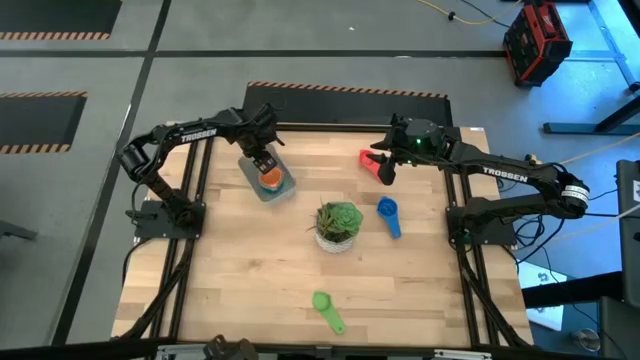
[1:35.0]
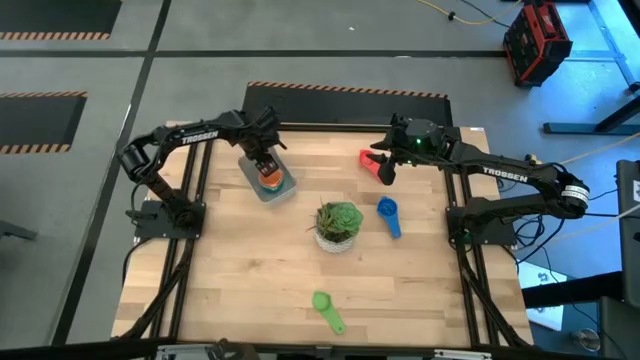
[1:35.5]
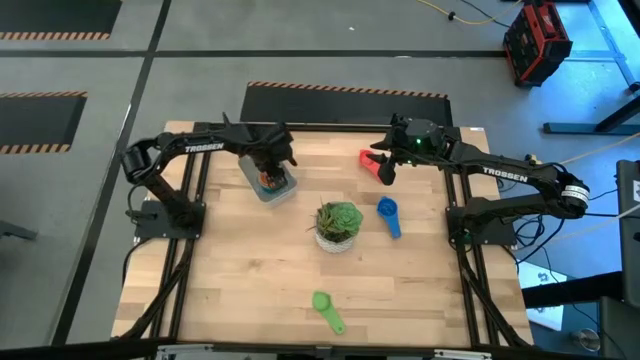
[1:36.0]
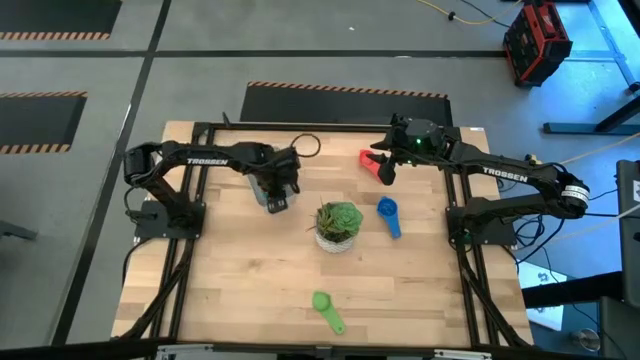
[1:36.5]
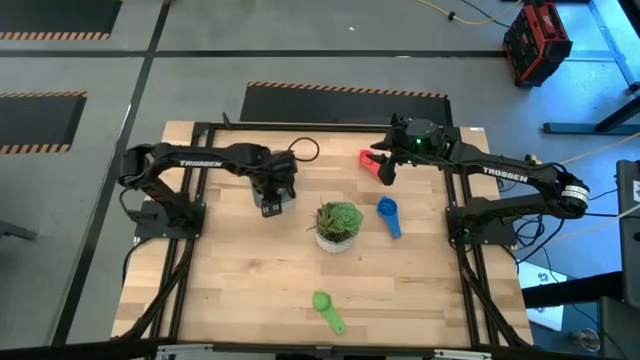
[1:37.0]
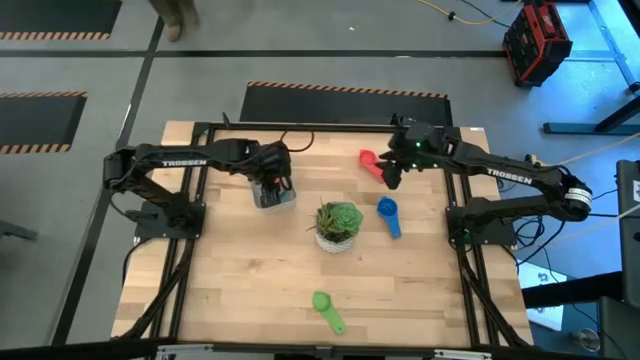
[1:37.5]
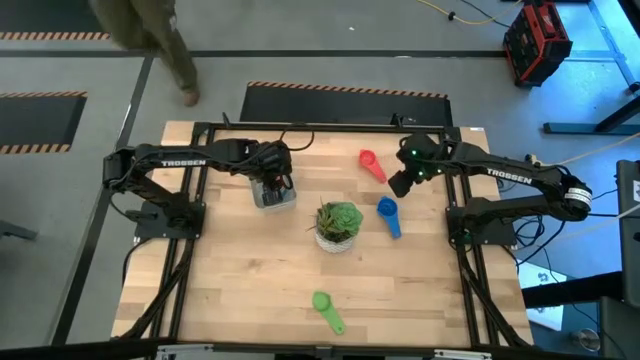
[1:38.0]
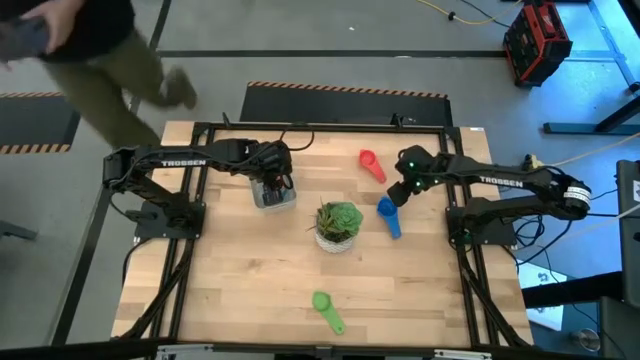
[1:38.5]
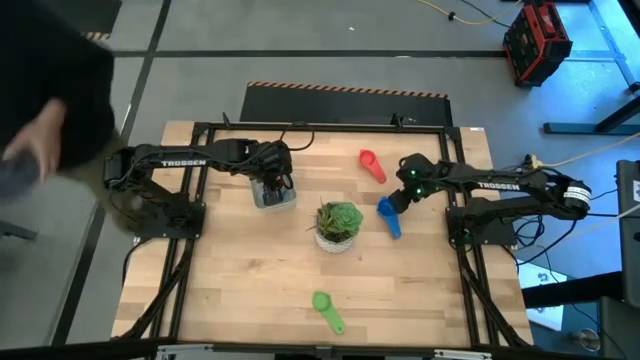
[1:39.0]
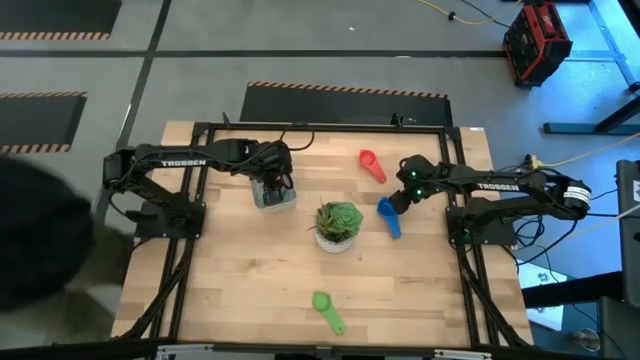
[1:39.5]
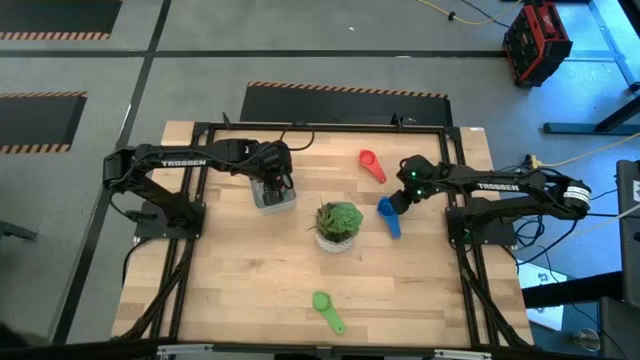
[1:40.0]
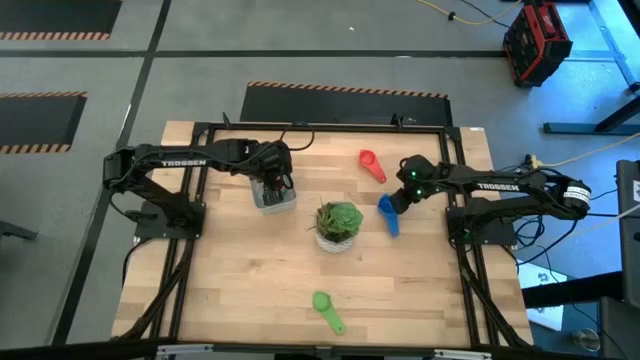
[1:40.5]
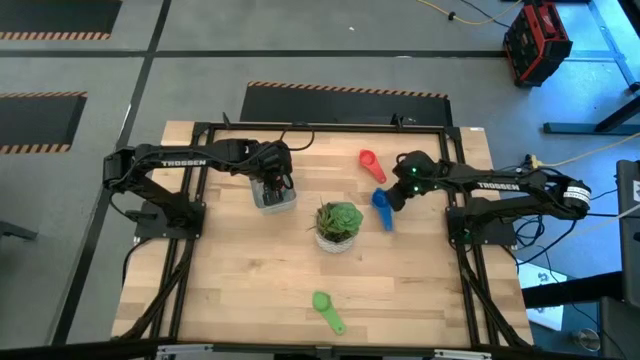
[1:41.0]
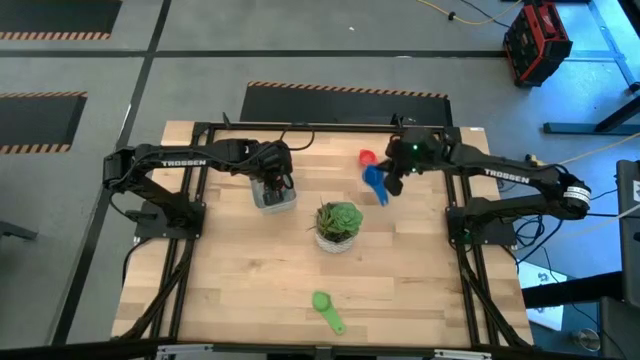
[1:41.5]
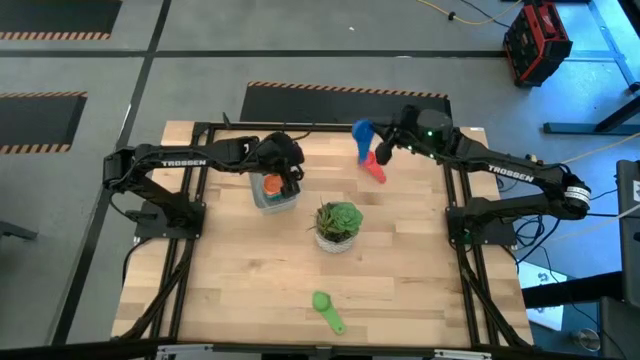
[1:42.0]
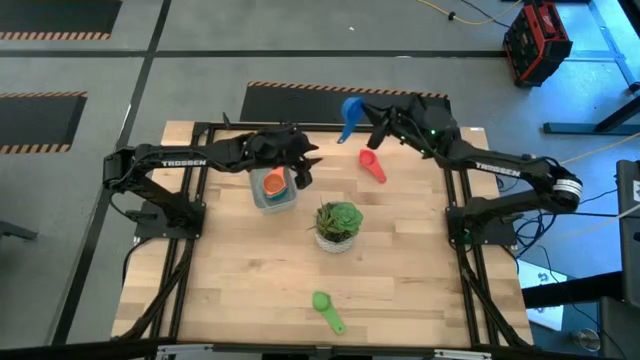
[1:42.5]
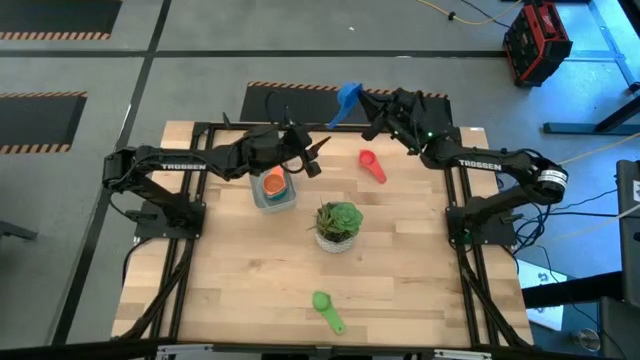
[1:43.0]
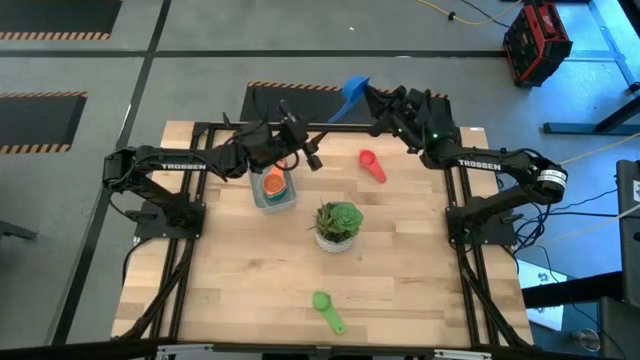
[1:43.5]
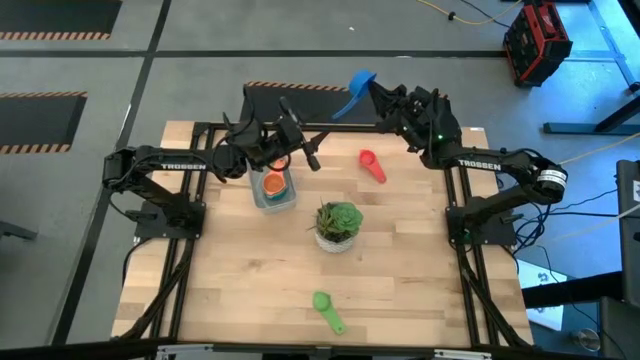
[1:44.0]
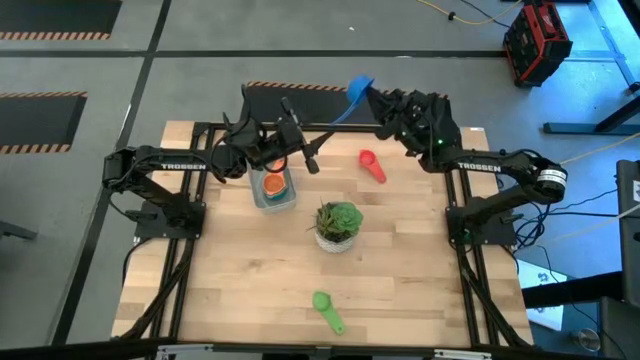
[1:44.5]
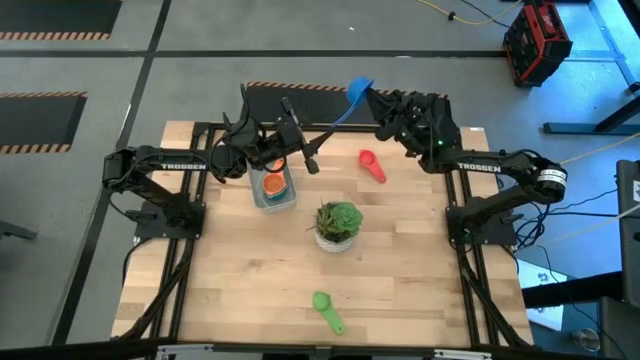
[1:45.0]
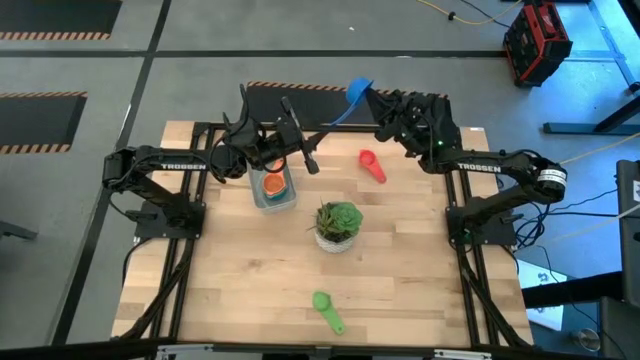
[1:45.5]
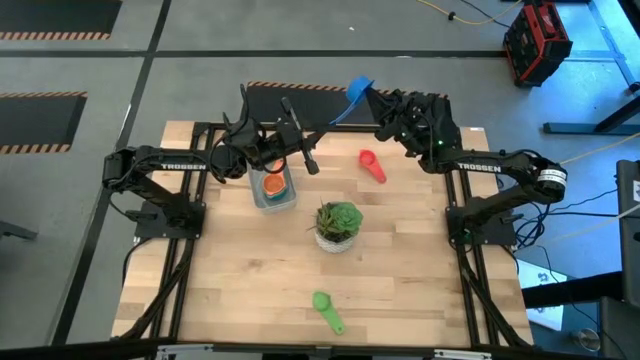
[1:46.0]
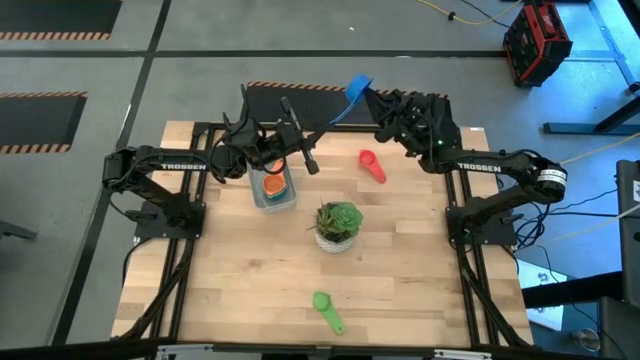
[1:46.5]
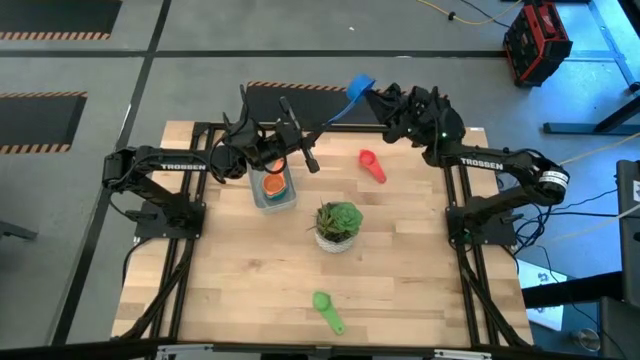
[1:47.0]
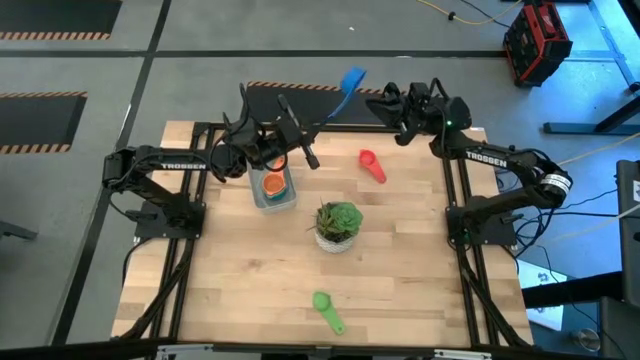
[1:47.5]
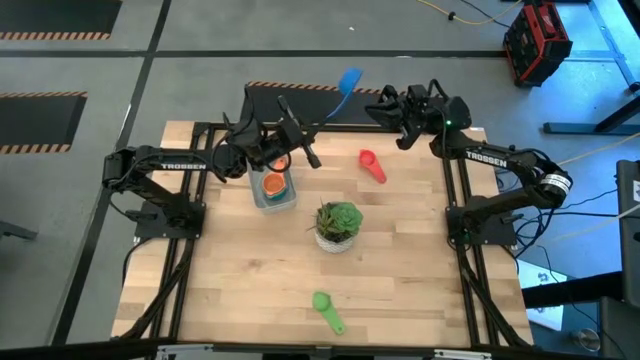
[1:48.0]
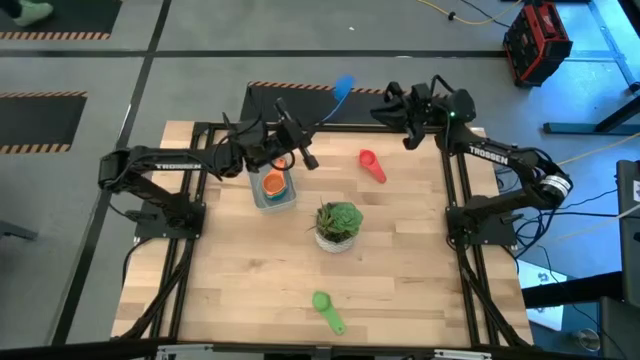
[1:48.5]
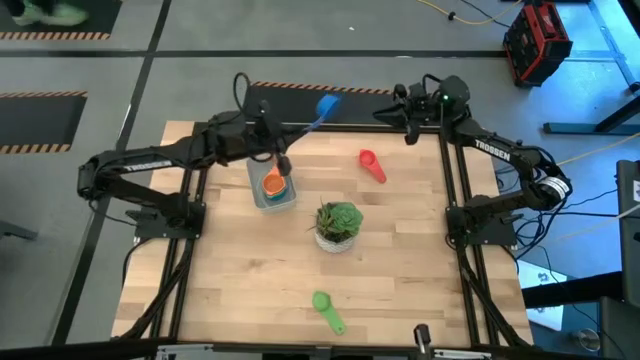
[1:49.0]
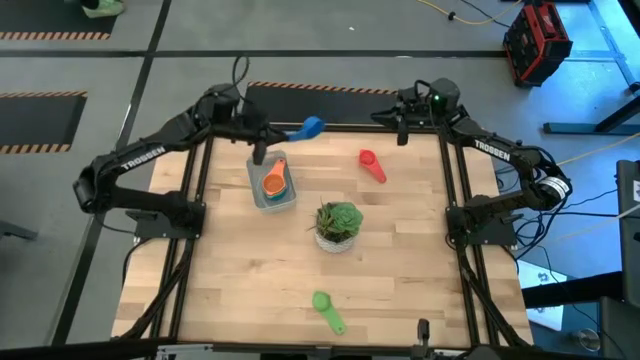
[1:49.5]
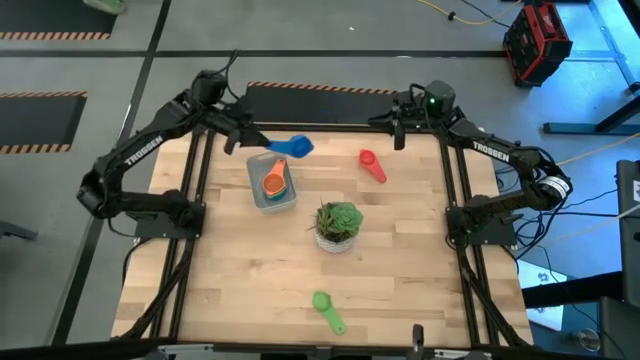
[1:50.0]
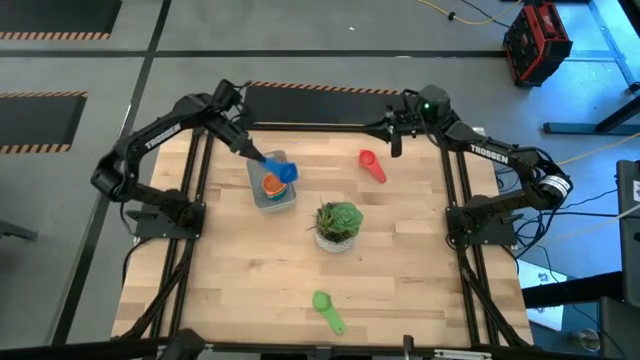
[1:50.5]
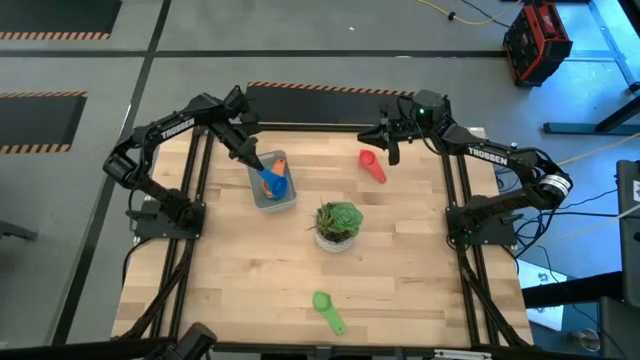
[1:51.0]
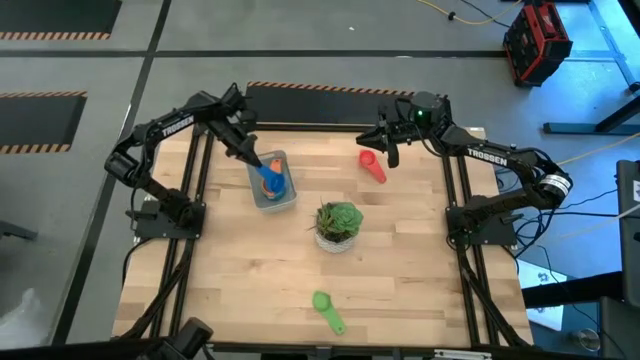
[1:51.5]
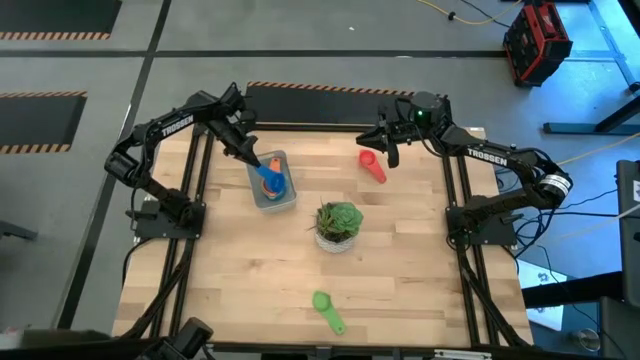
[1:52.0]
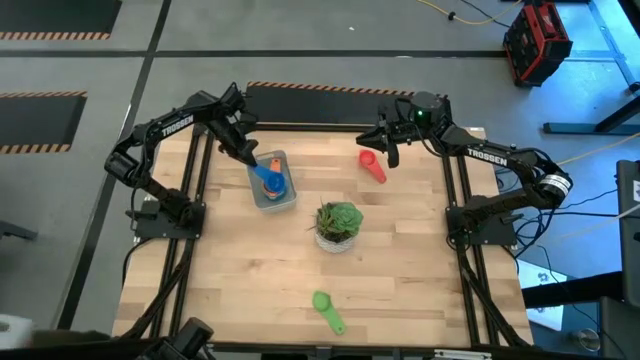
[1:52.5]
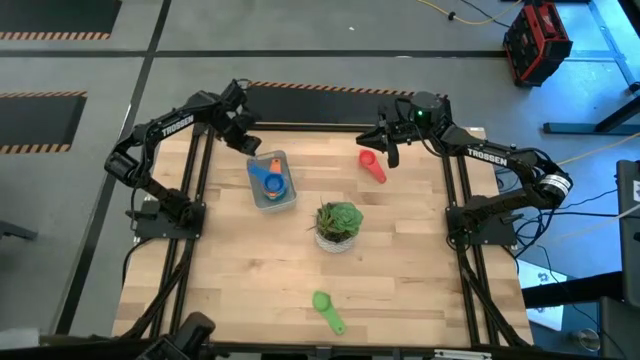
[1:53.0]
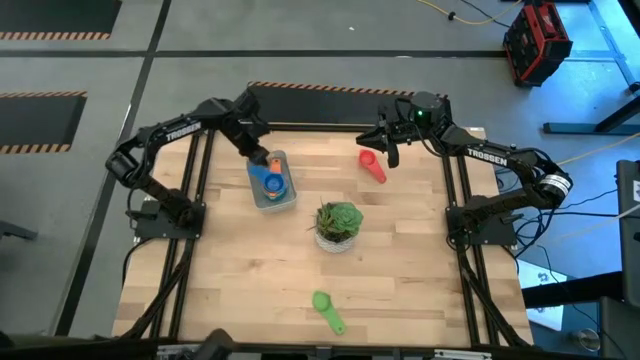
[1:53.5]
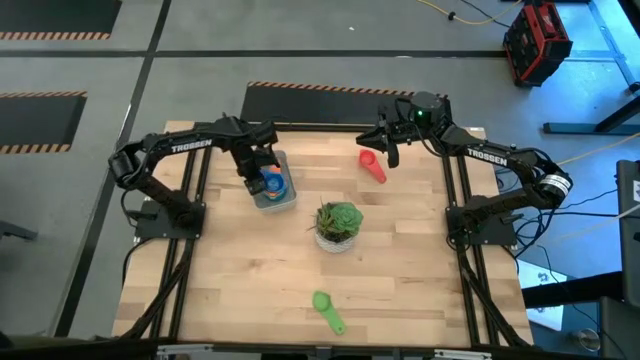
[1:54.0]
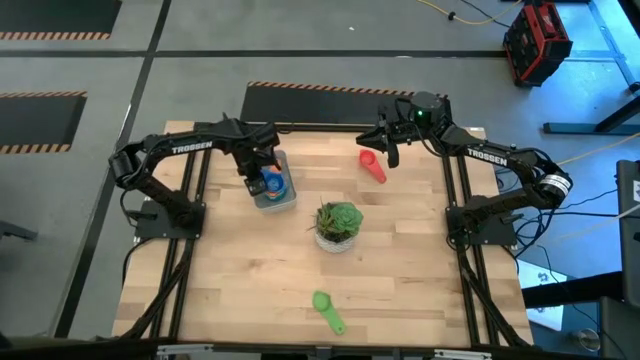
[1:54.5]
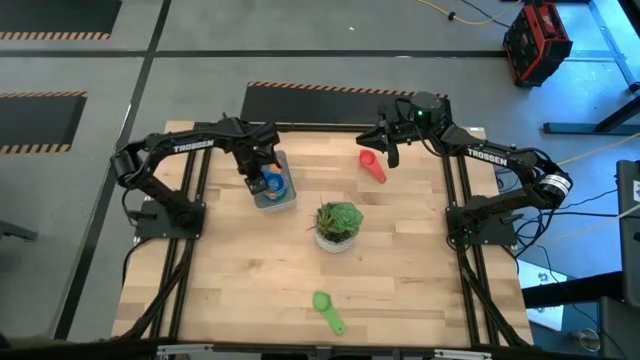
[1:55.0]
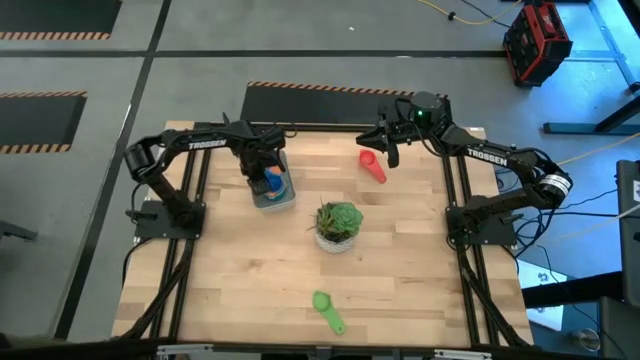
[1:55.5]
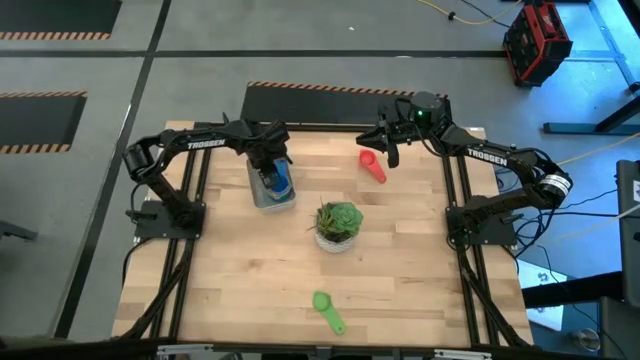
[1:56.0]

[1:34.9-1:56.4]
Task: Nest measuring cups in basket
Stack the blue measuring cup on top of the orange measuring cup in the gray bin
